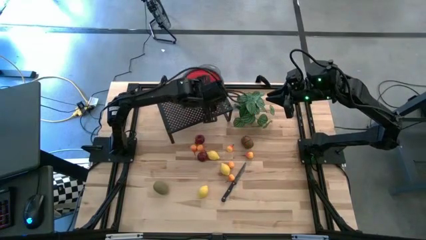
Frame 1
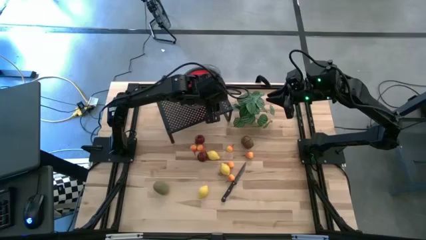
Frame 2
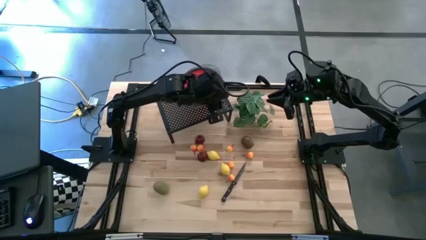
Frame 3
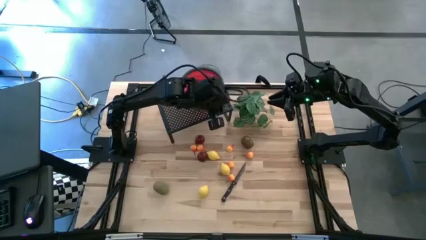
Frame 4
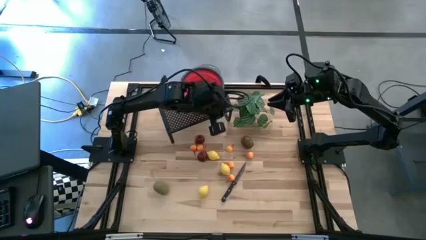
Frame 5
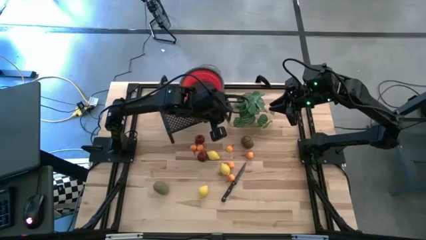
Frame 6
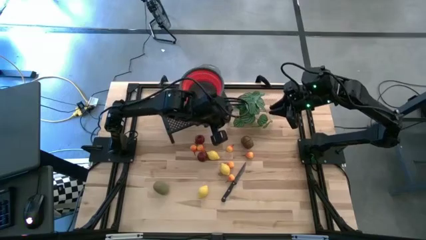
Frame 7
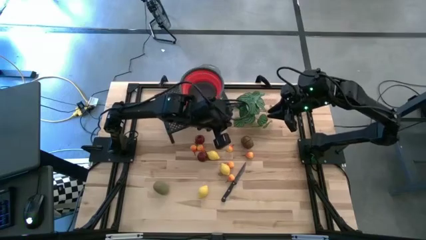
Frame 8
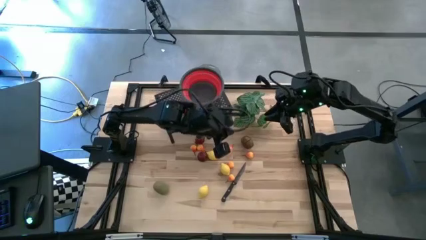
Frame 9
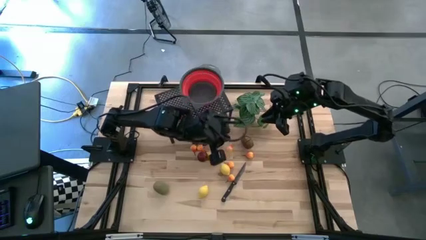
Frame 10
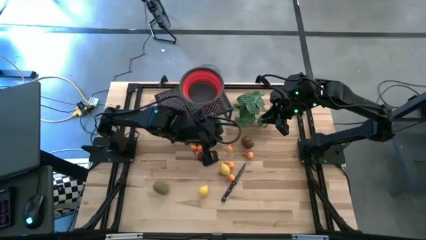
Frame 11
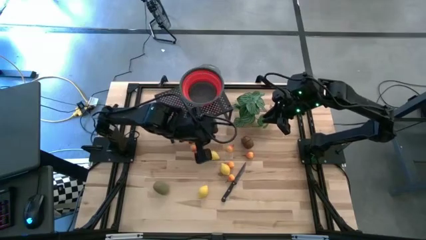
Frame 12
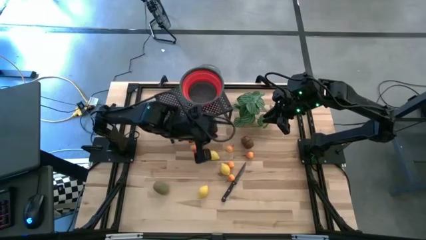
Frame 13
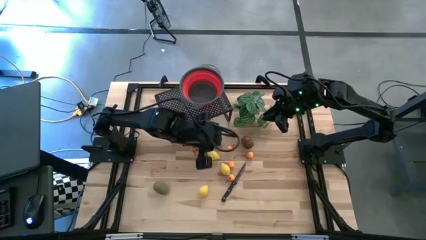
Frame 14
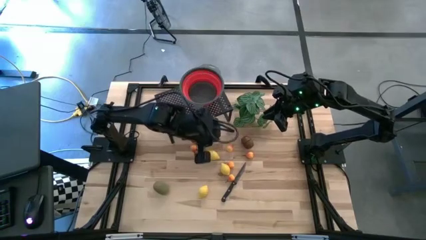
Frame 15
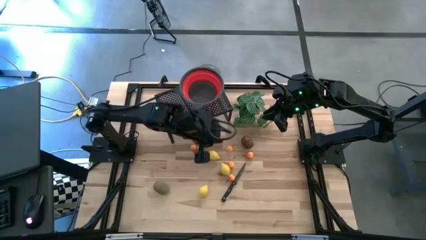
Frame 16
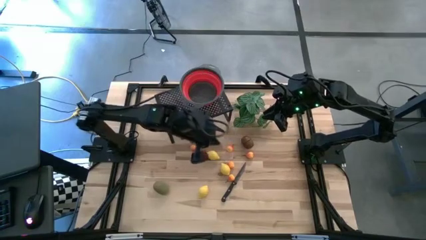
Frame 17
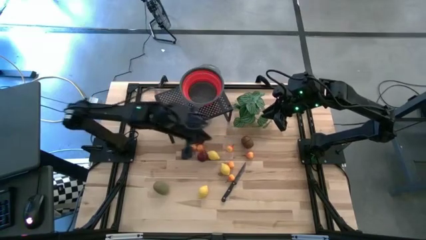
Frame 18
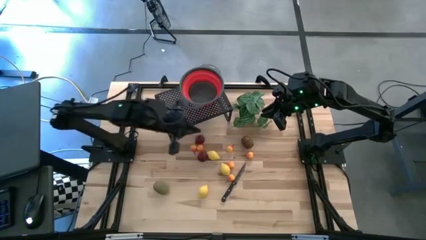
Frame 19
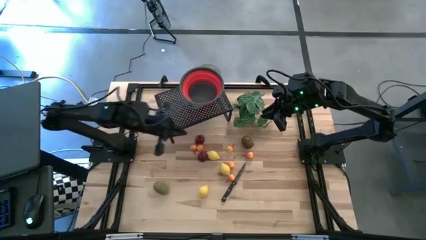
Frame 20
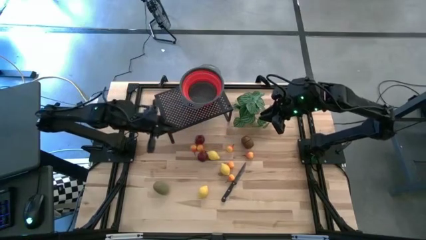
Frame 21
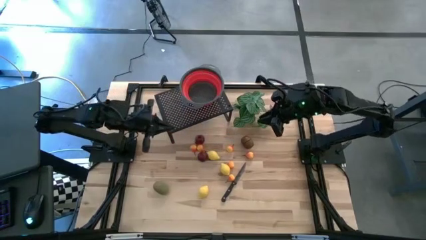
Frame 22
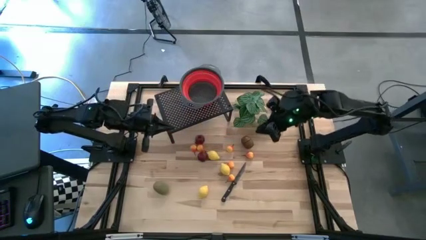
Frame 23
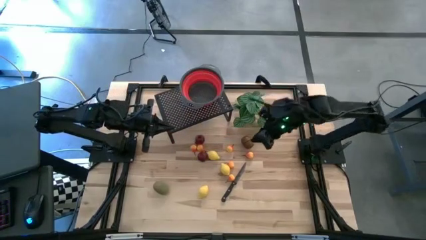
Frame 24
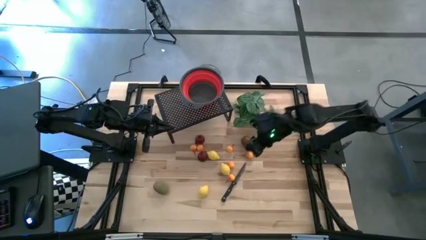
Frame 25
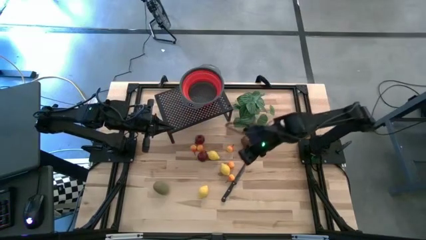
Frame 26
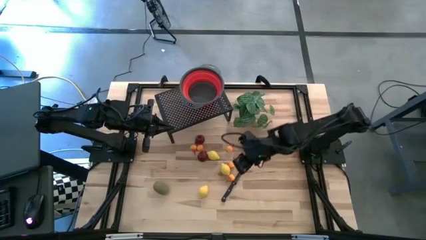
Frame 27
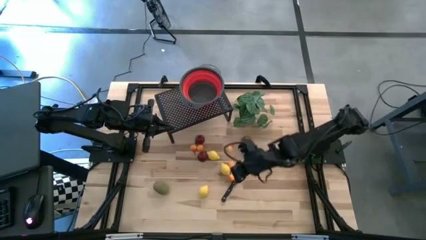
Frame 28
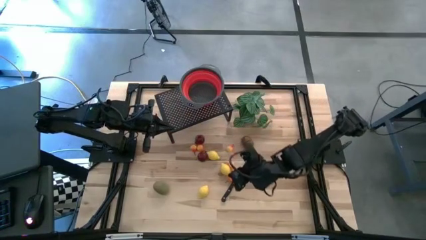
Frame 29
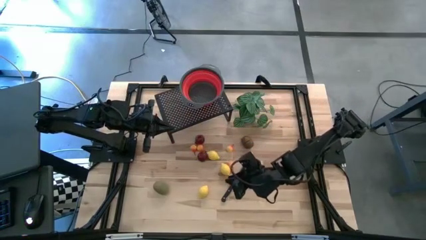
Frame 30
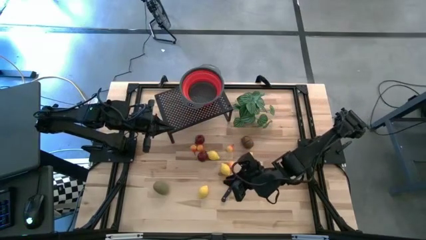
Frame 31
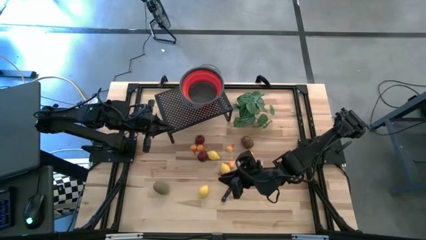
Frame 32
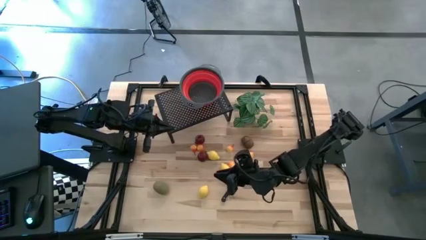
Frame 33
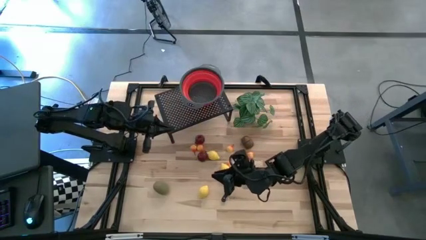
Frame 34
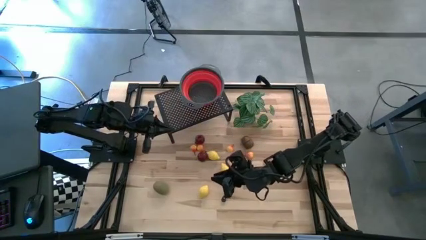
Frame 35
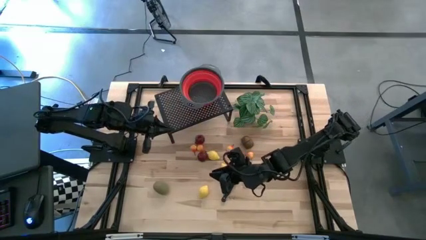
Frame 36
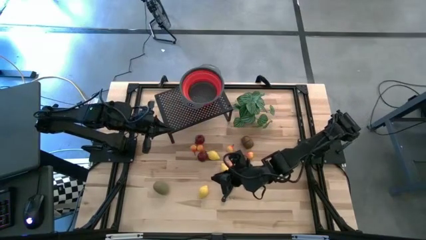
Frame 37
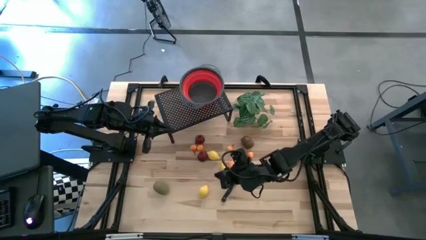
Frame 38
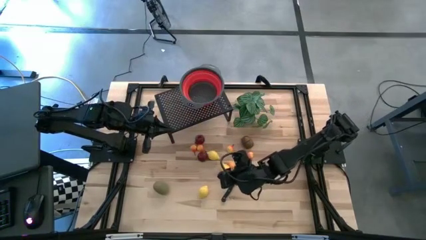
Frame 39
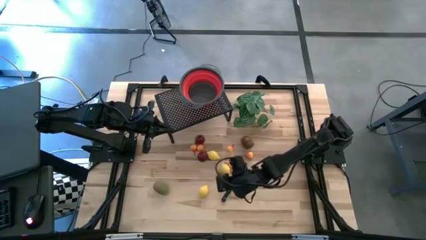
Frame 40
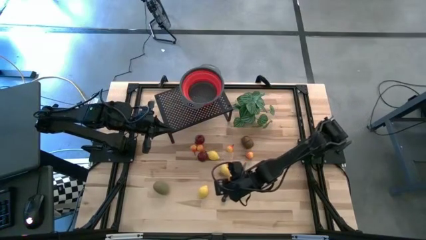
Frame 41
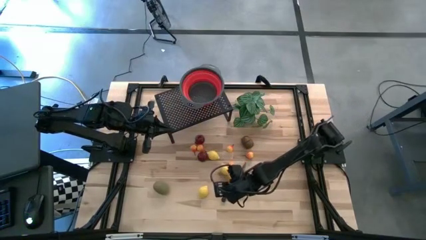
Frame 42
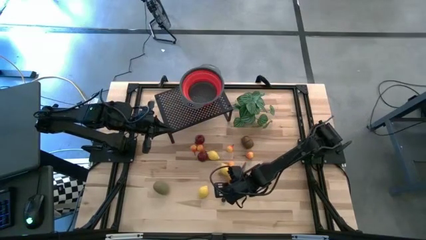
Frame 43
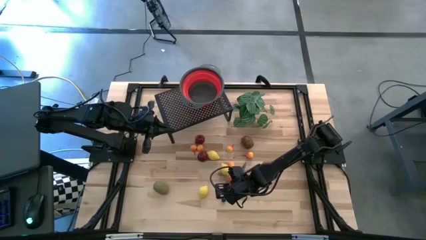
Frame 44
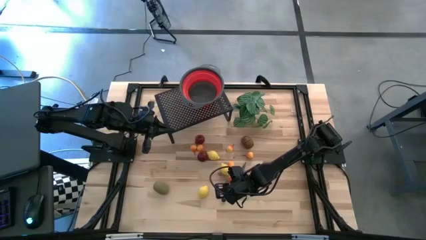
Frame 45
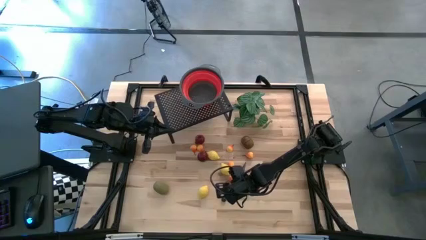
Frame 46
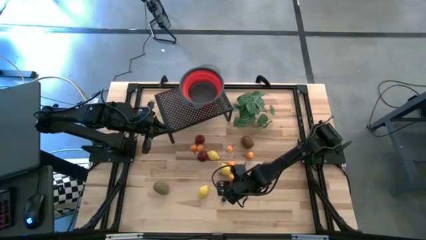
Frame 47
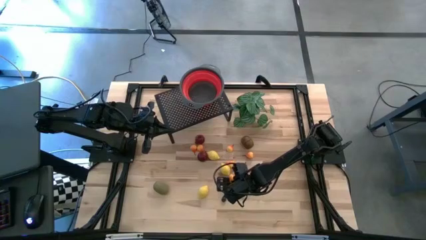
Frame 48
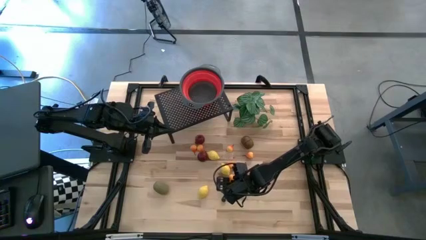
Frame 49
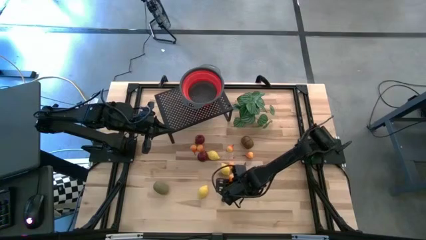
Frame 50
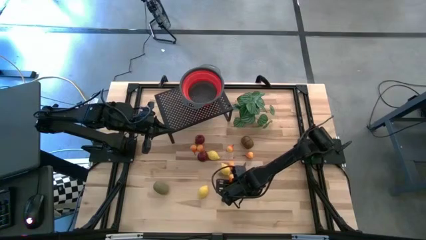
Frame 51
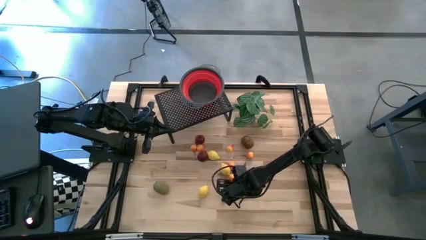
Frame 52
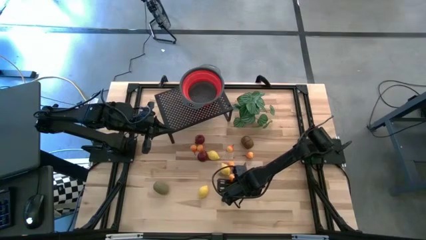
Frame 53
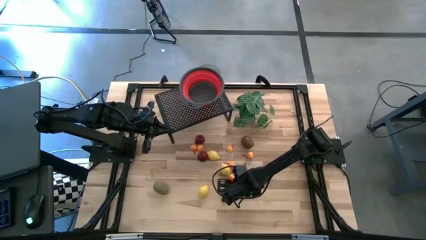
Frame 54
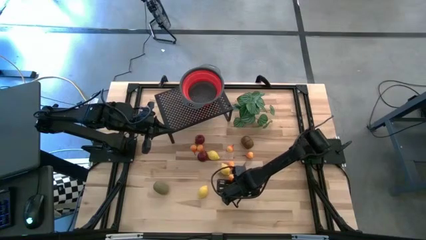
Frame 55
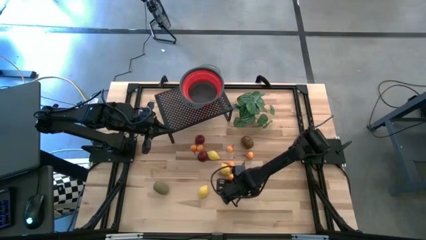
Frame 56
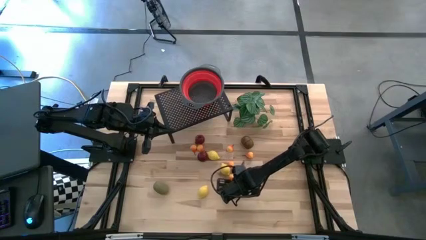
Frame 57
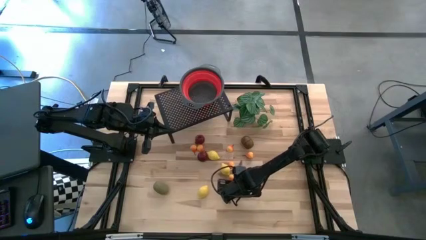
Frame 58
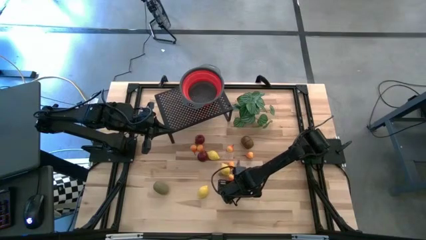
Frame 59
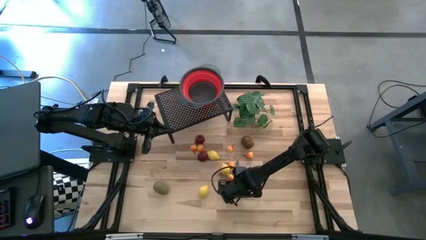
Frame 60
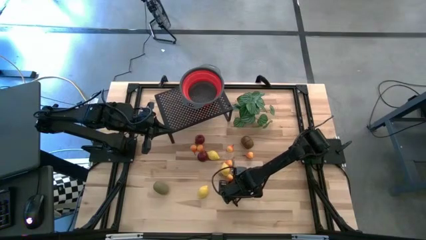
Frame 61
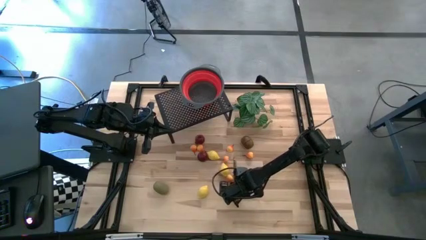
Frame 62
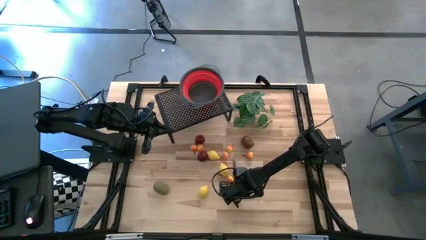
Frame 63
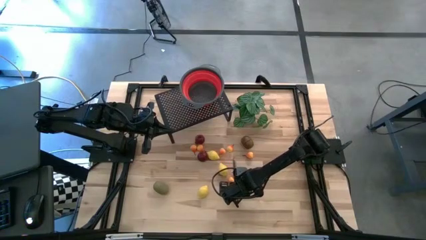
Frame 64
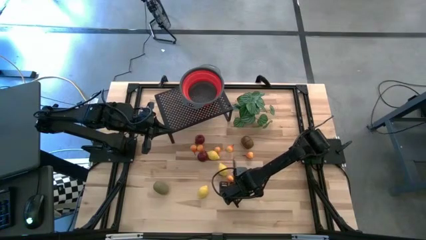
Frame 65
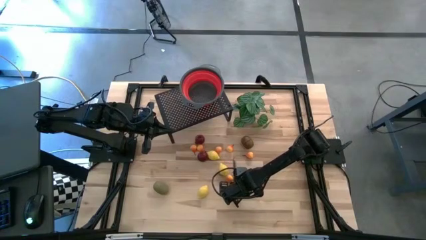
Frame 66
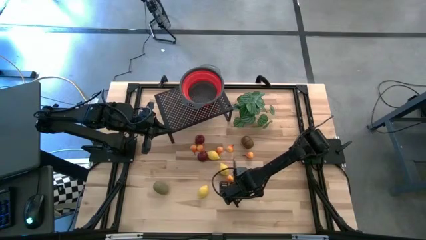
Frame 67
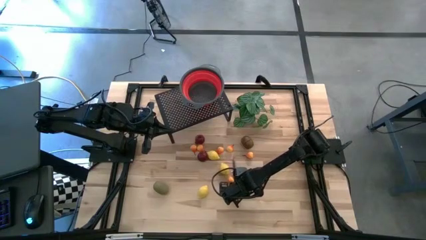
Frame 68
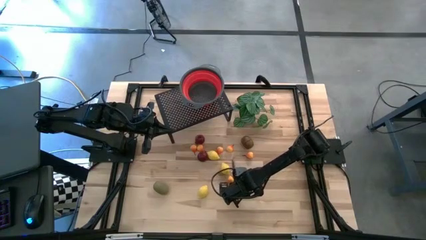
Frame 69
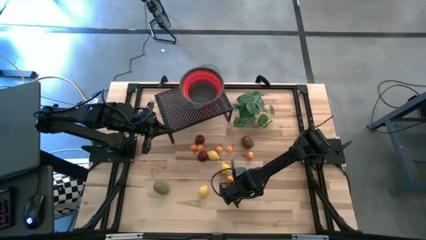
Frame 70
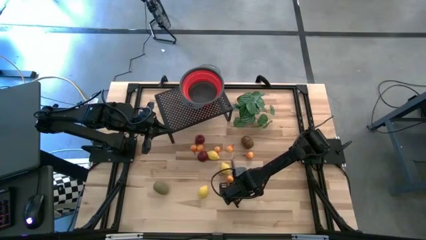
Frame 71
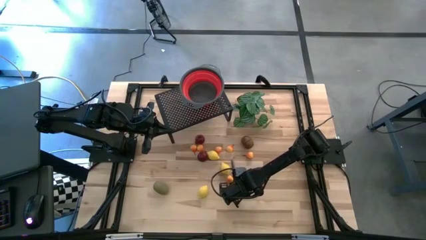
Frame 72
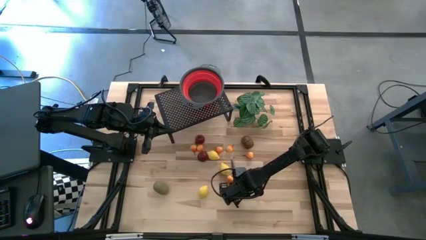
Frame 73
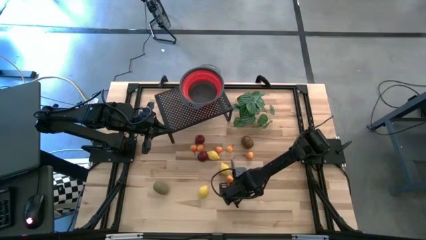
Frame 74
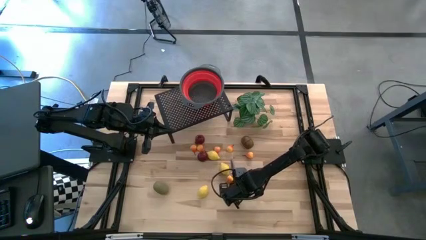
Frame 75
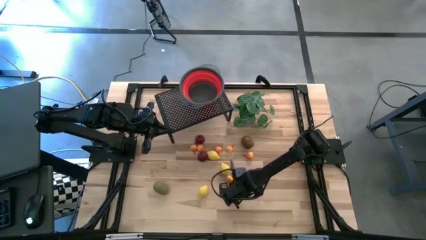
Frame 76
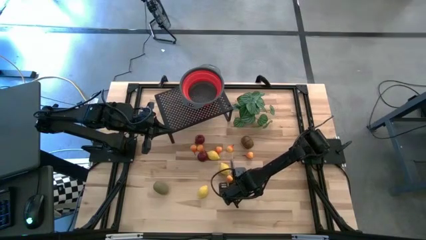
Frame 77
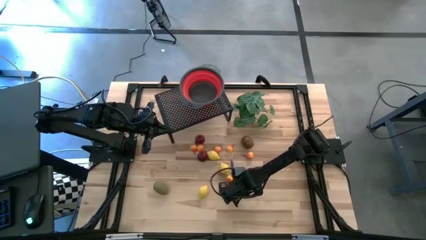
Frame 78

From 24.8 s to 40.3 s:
Task: Pick & Place Fruit
Put the black knife on the shelf
